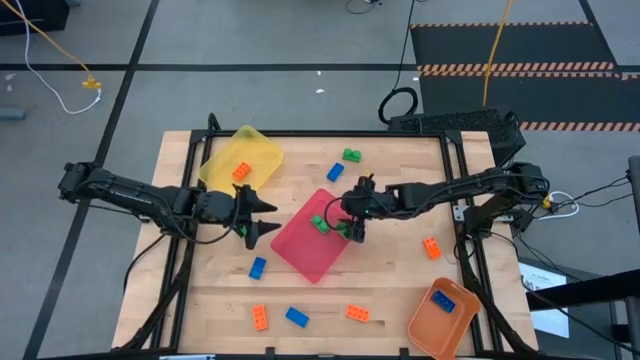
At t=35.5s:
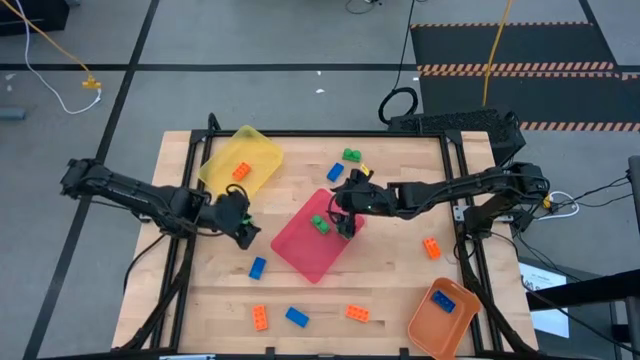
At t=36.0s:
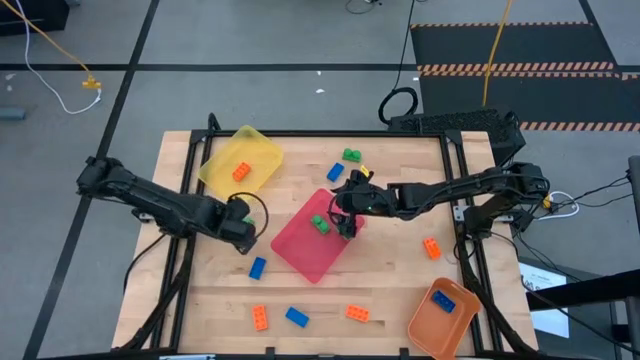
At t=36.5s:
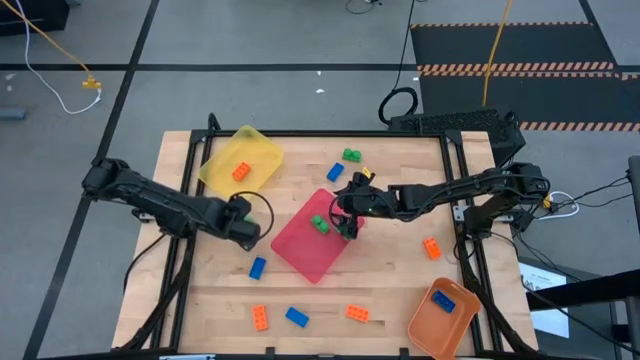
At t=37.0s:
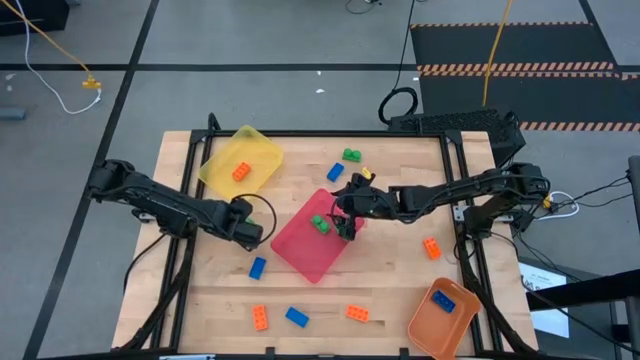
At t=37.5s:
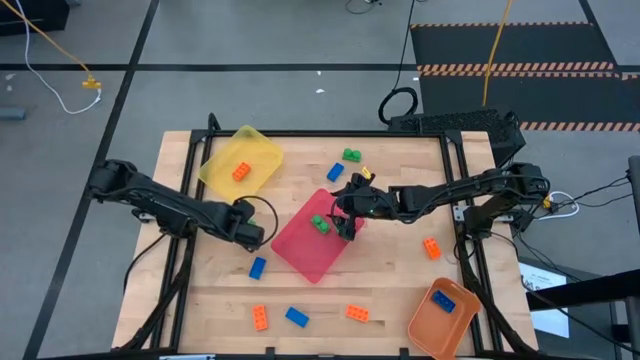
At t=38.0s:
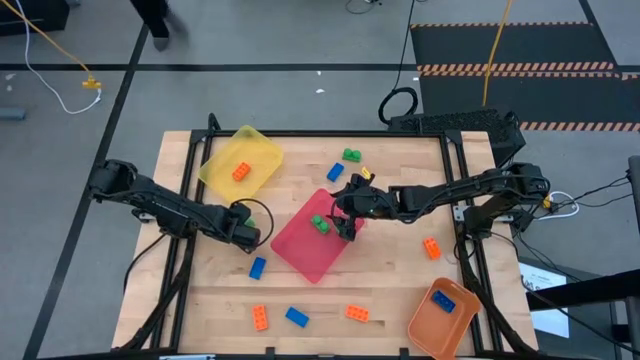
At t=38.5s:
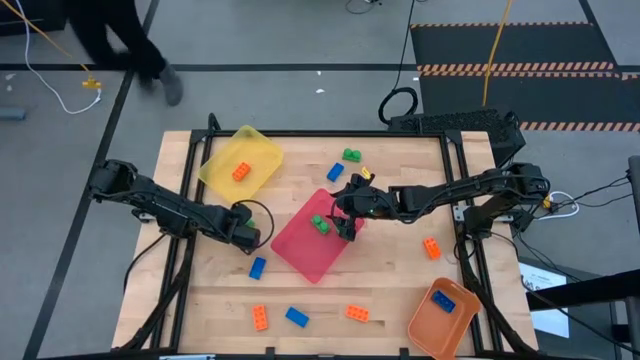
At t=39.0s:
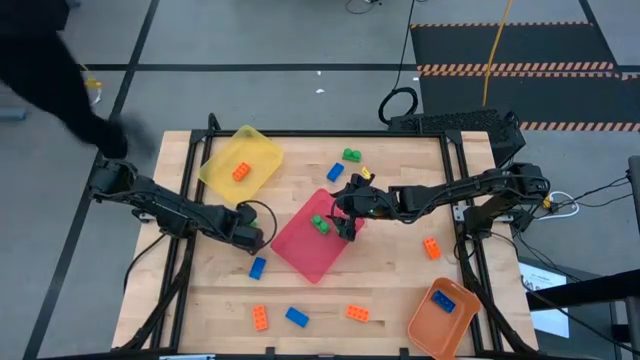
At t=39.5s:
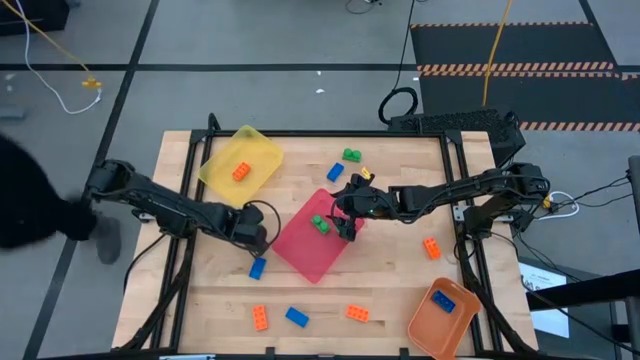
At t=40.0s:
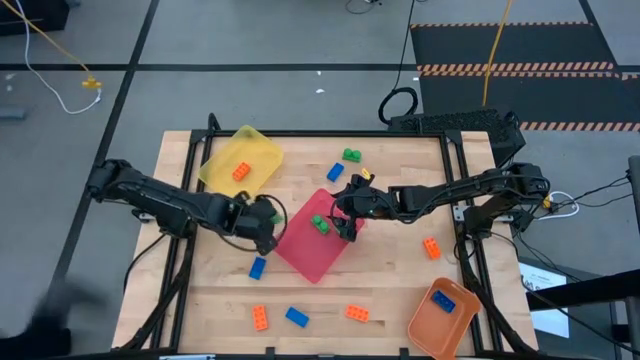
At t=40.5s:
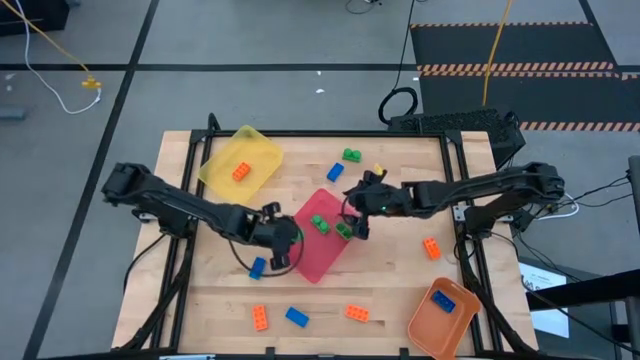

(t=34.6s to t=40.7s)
Task: Sort & place blocks by color
Put the green game piece into the red bin

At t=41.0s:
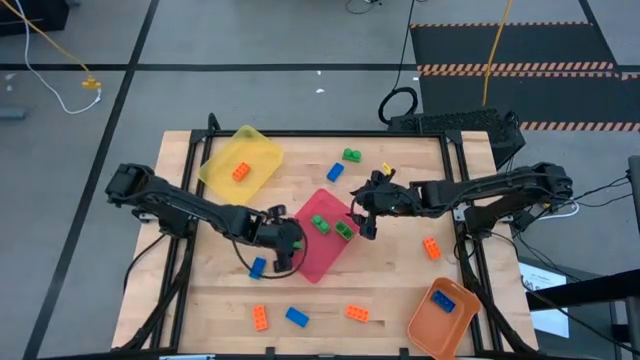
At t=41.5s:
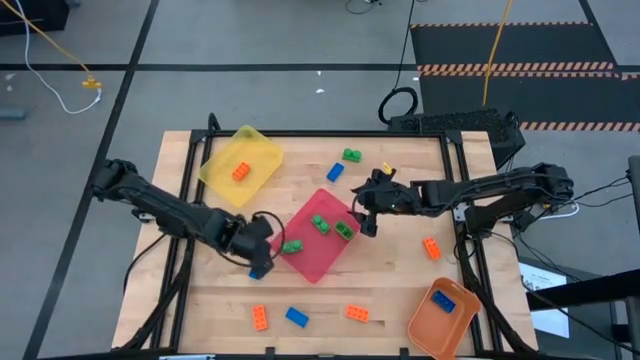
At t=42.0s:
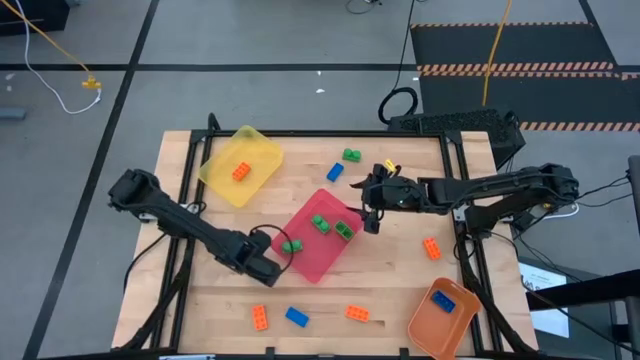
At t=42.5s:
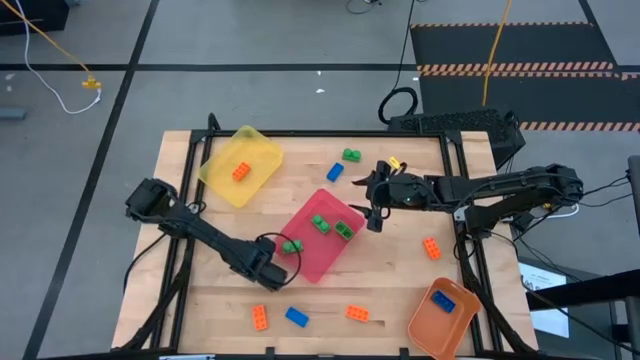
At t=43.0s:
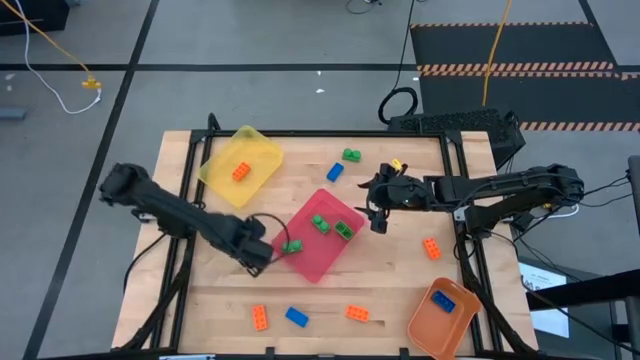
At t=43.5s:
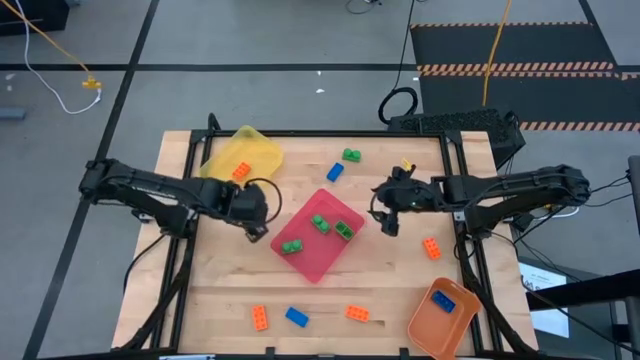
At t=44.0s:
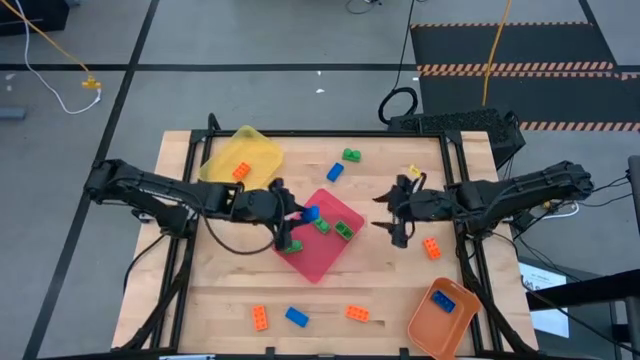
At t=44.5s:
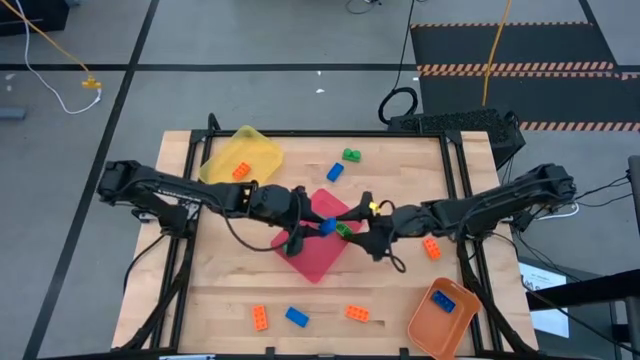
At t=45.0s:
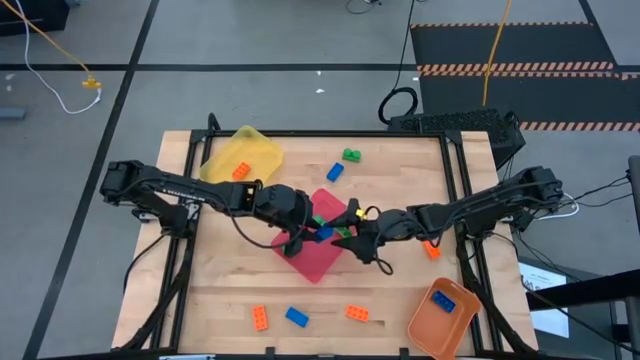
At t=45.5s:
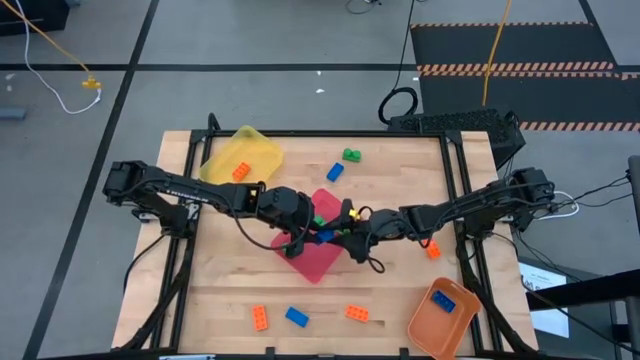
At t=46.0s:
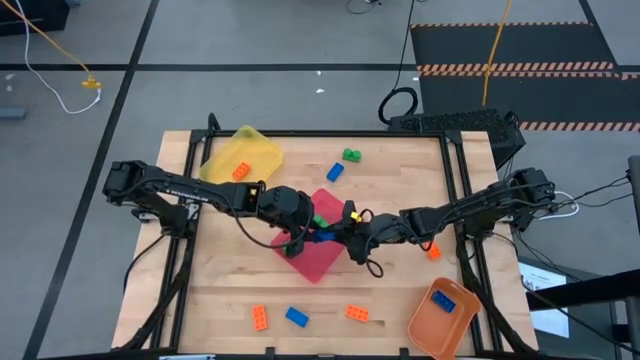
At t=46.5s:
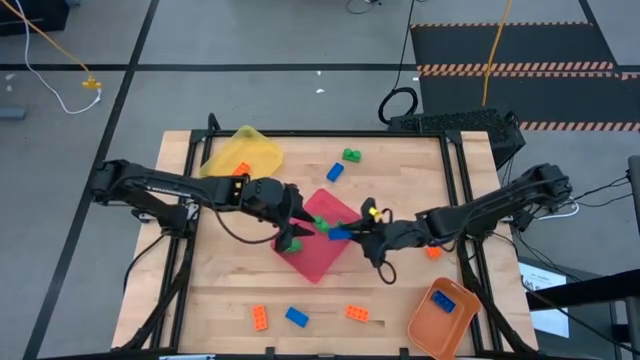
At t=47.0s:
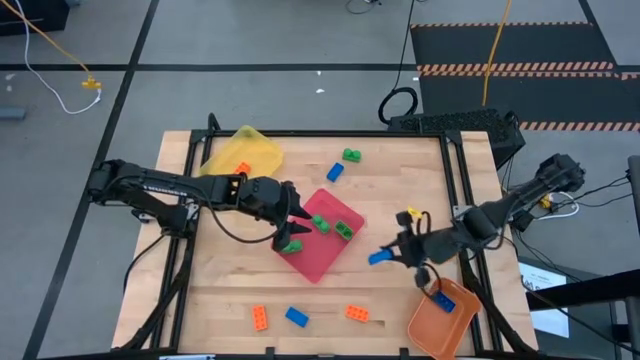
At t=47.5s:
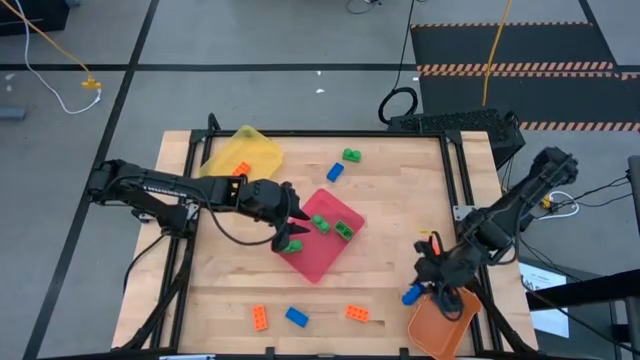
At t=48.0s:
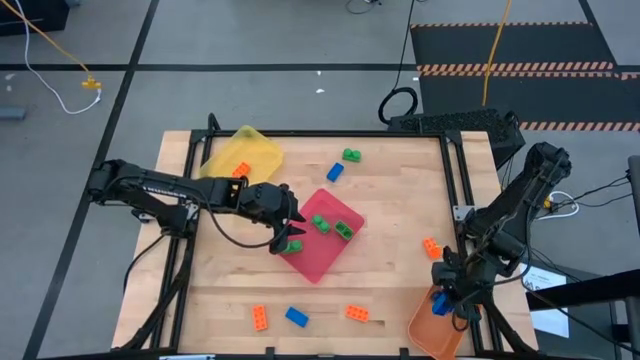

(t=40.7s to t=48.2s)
Put the blue game piece into the orange bin

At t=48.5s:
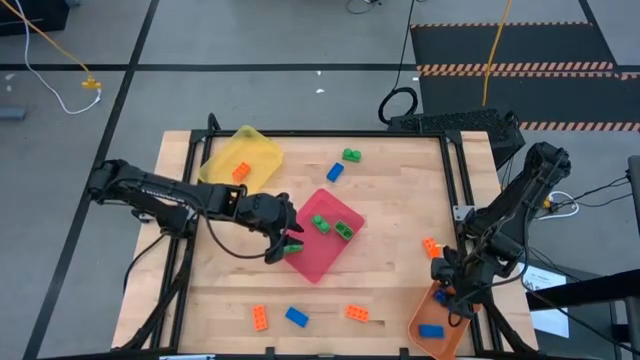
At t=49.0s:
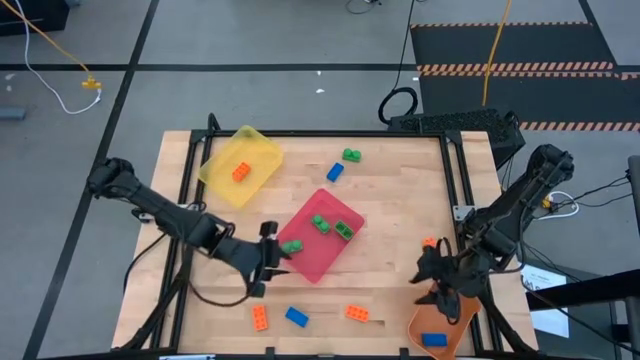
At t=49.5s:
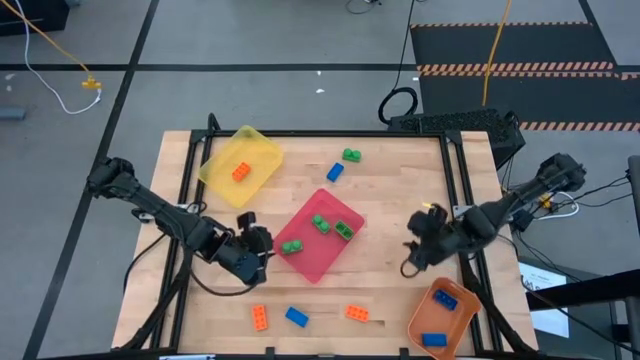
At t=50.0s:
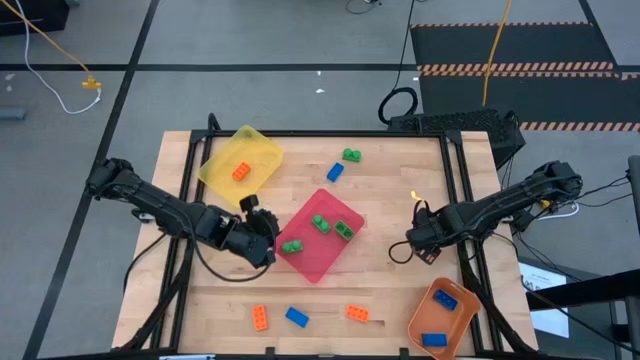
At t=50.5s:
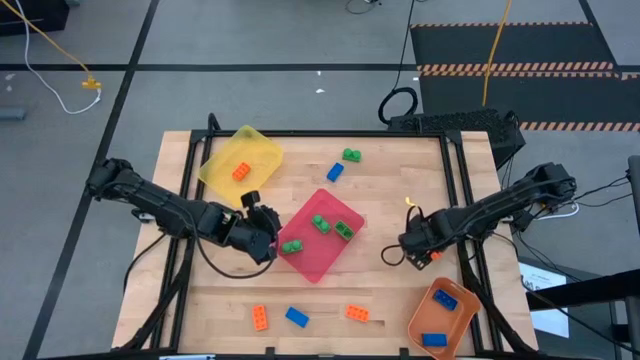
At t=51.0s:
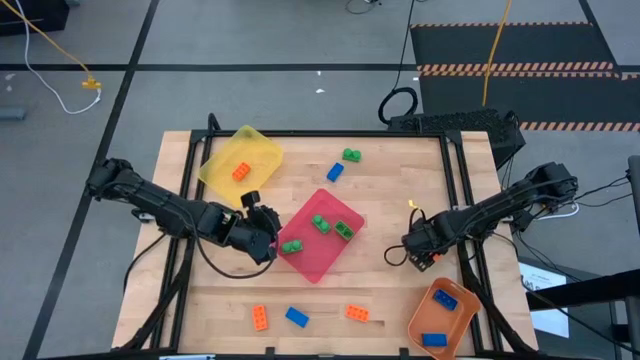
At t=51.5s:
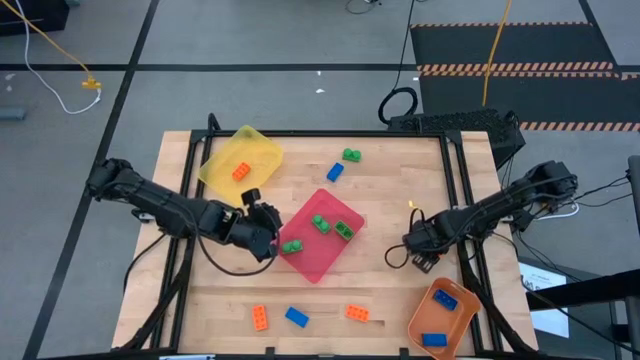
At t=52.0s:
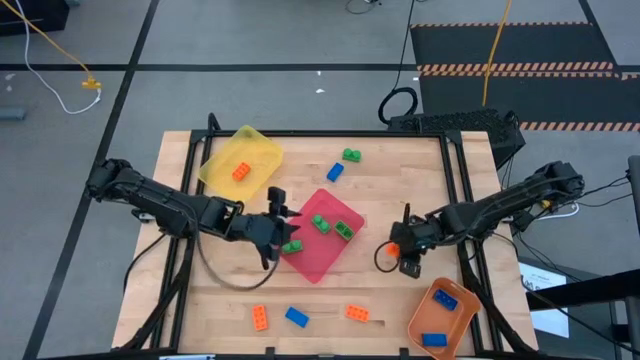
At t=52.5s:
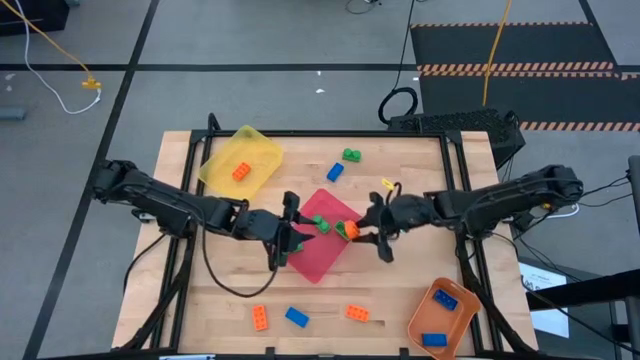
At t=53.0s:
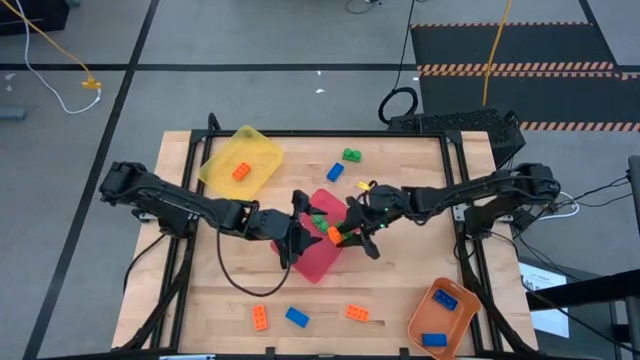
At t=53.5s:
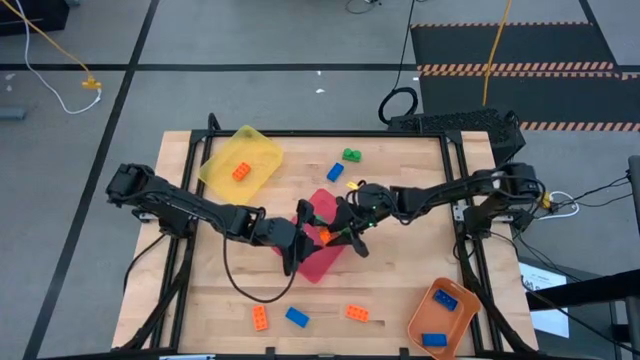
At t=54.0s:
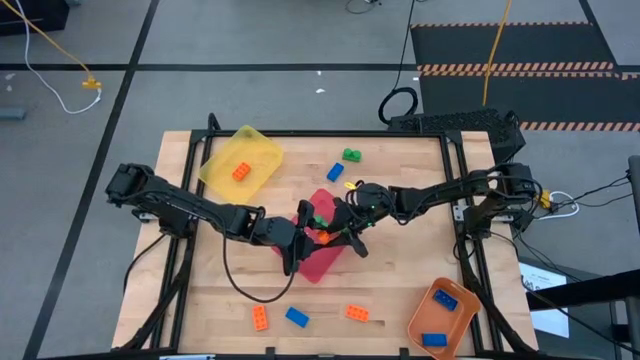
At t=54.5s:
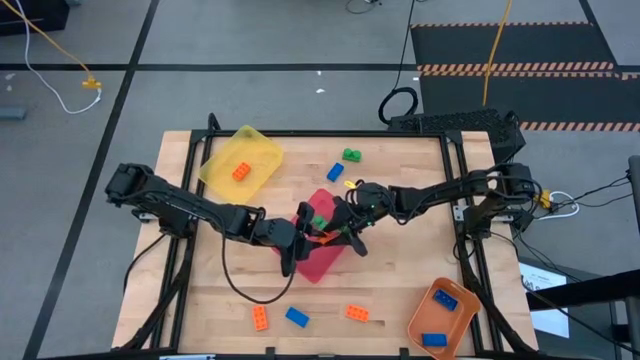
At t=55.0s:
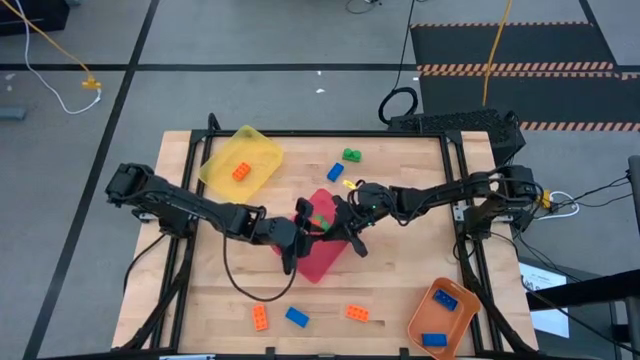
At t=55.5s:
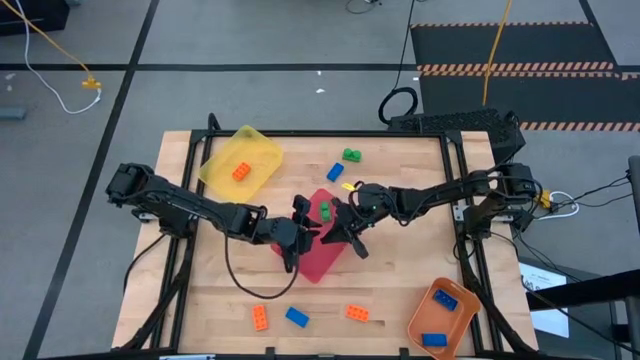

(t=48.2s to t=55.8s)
Put the orange game piece into the yellow bin

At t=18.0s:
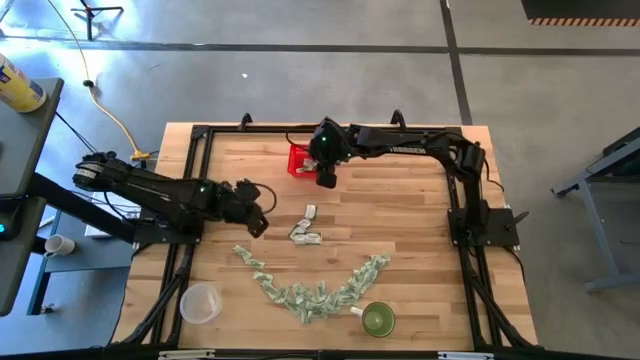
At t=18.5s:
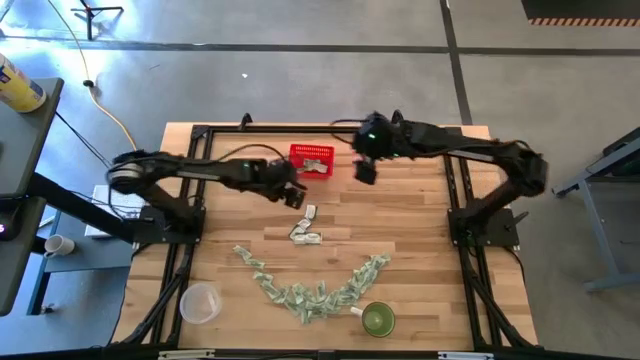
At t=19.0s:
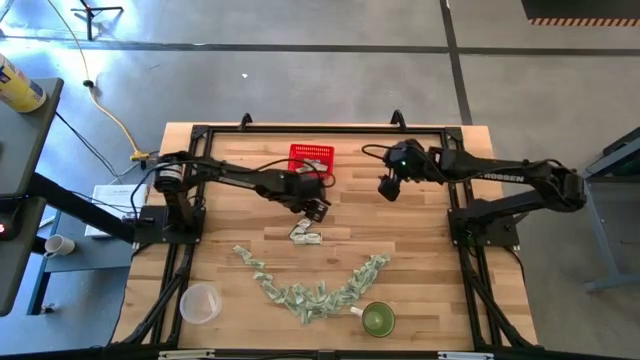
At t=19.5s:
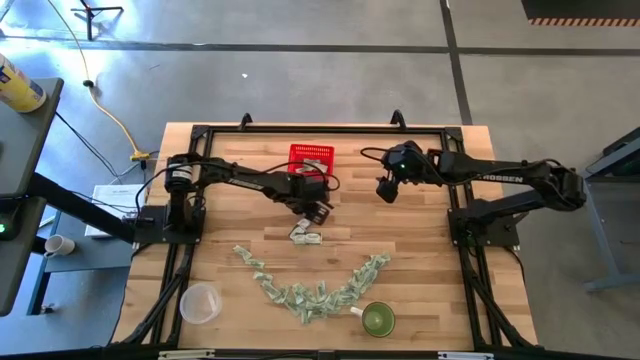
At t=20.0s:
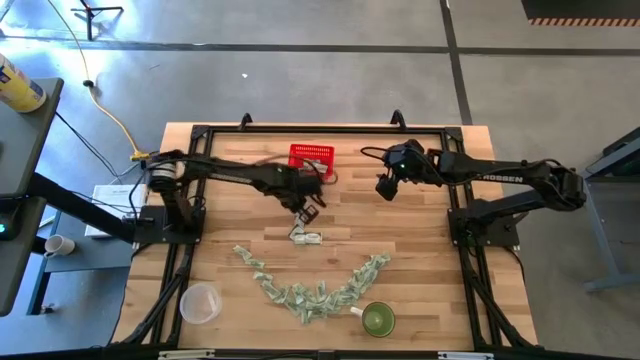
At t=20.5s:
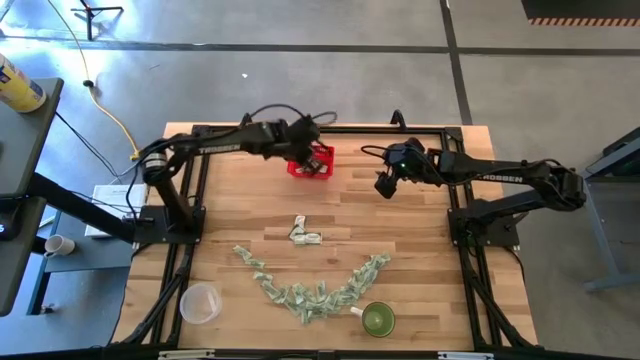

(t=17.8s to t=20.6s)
Task: Pick and place items into bin
Put the green stevia packet into the red bin
